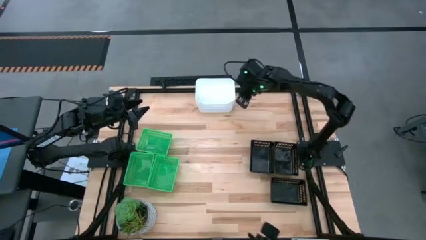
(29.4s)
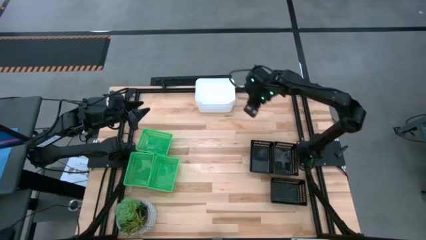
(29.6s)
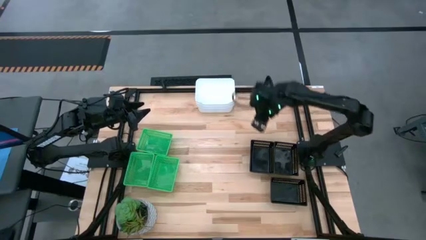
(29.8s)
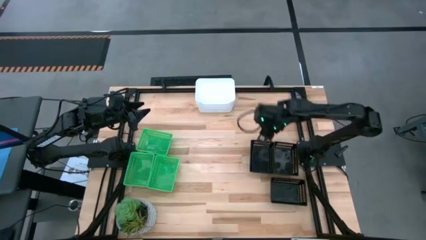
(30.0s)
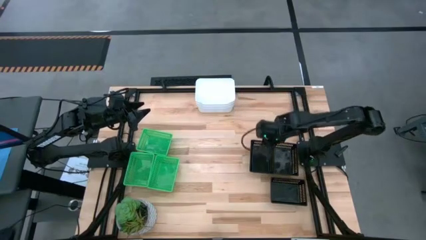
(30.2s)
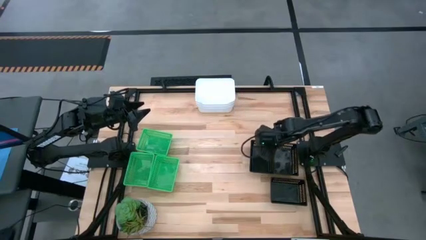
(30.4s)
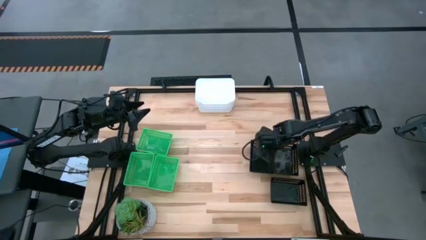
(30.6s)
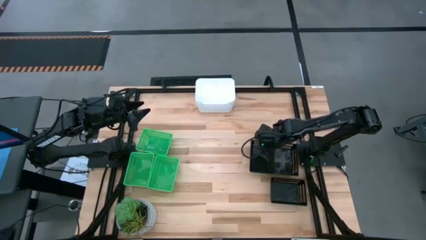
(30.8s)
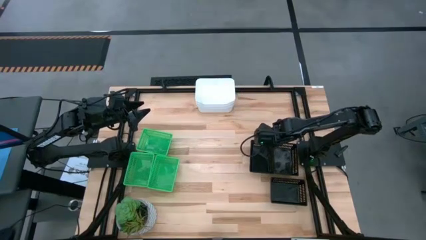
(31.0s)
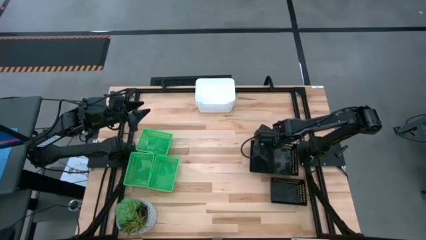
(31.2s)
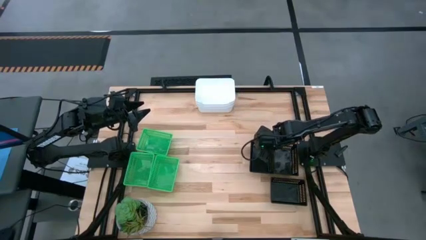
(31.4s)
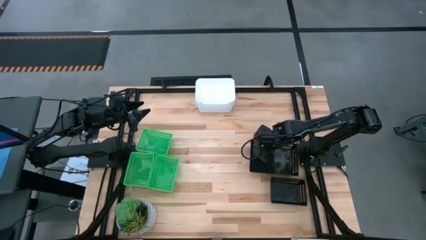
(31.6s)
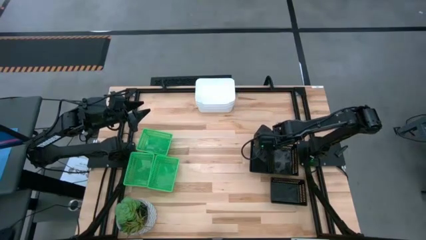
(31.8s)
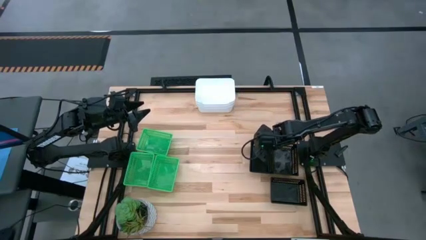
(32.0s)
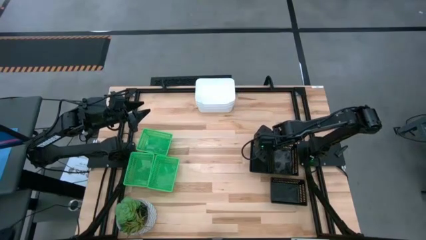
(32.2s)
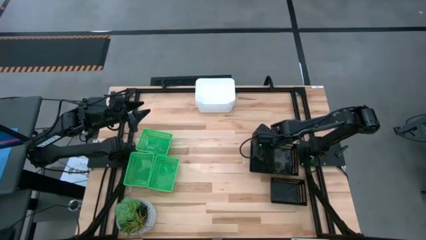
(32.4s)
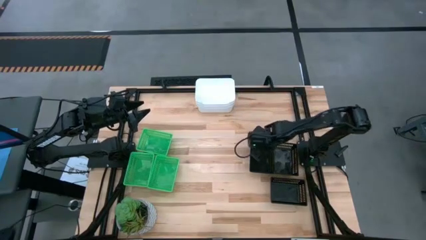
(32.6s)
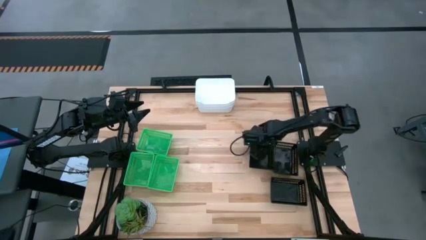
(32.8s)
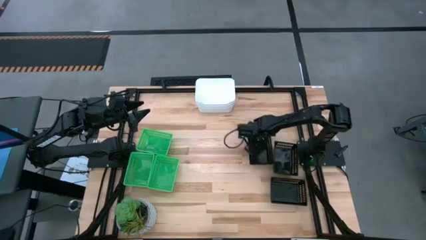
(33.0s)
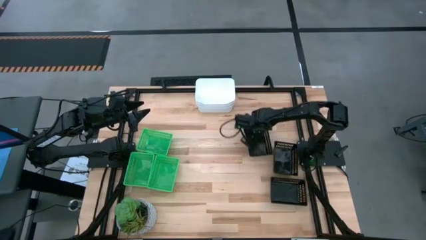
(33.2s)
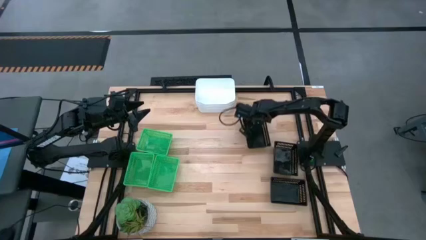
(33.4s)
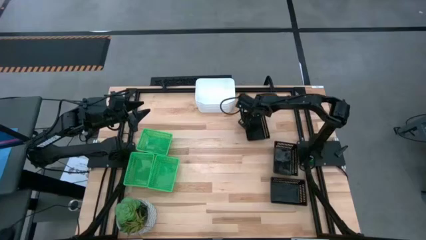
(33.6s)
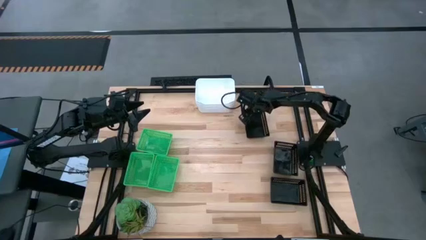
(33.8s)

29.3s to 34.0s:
Move the top left black bin to the top right of the table

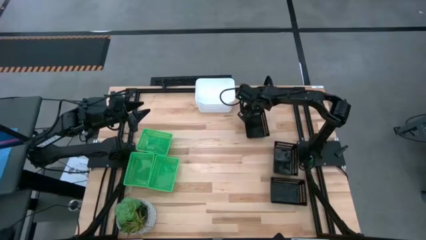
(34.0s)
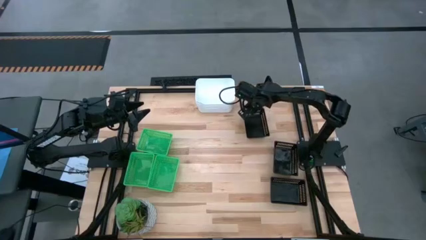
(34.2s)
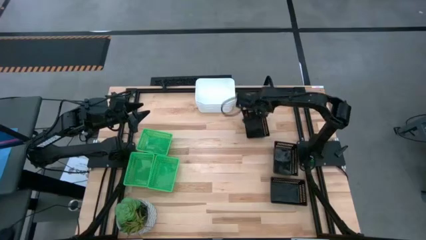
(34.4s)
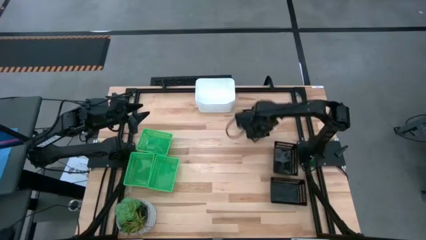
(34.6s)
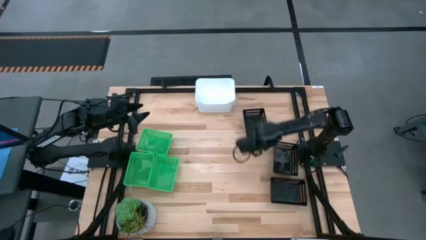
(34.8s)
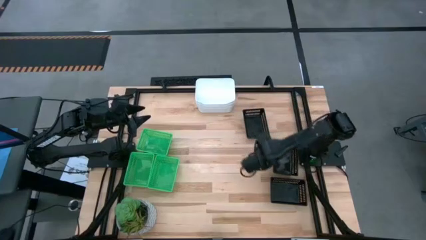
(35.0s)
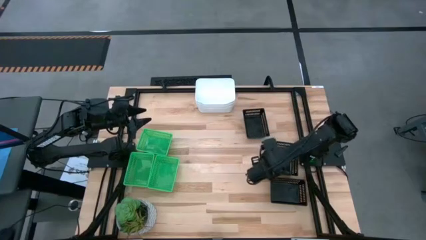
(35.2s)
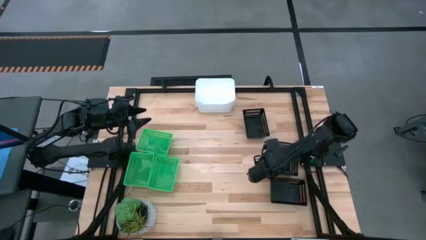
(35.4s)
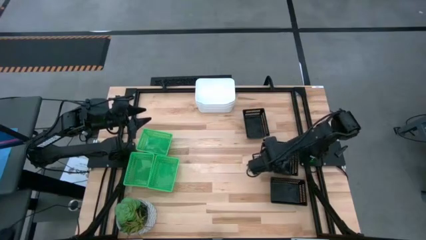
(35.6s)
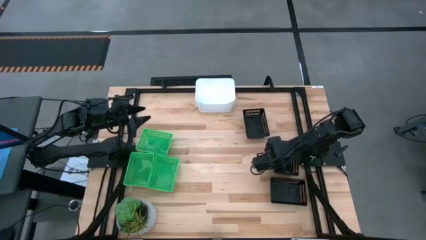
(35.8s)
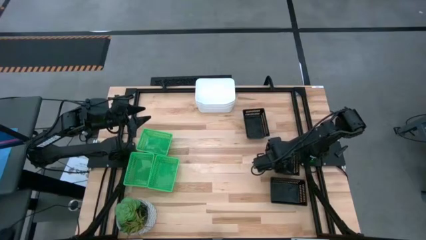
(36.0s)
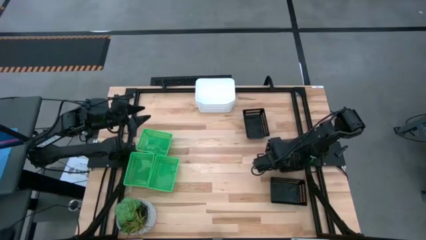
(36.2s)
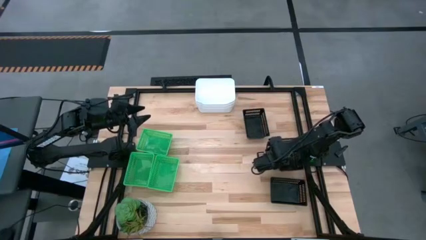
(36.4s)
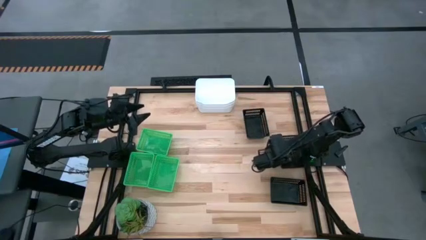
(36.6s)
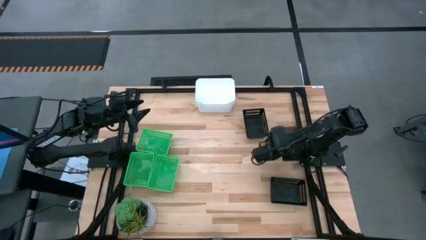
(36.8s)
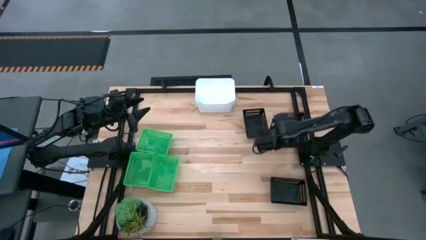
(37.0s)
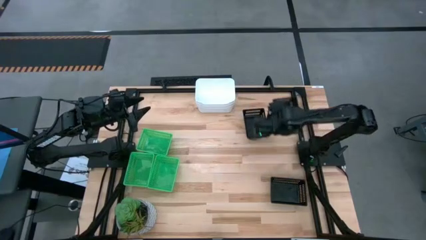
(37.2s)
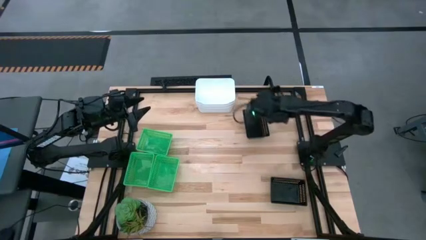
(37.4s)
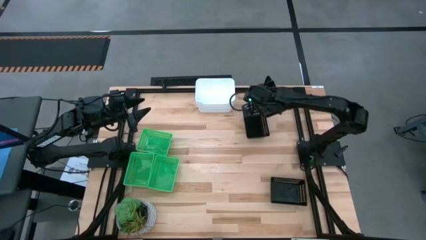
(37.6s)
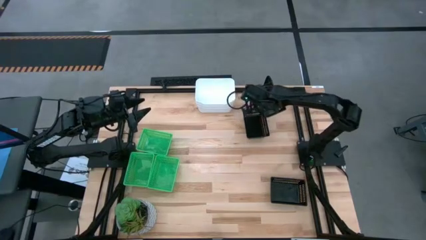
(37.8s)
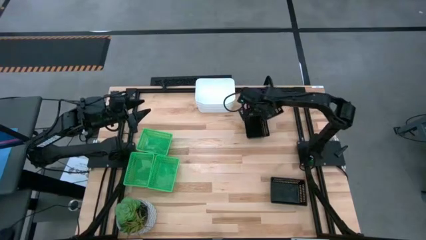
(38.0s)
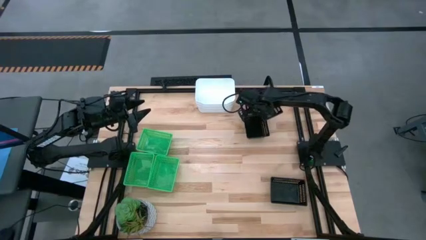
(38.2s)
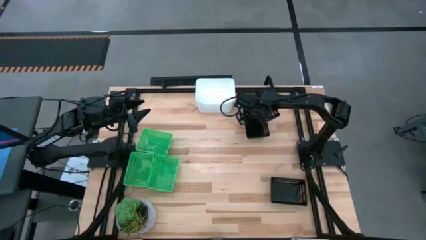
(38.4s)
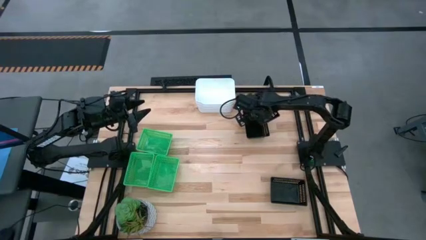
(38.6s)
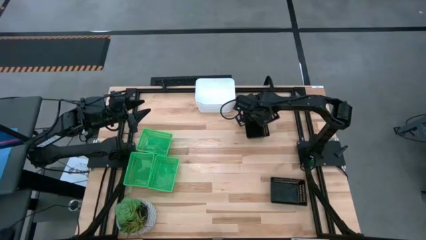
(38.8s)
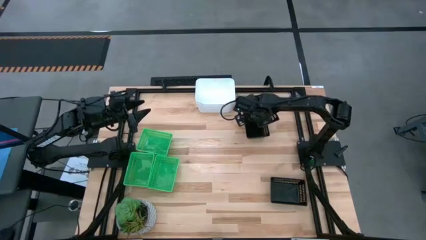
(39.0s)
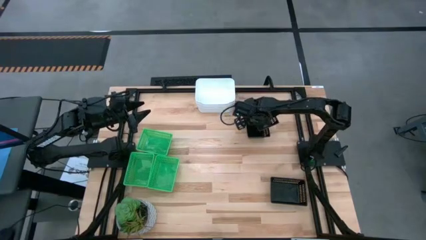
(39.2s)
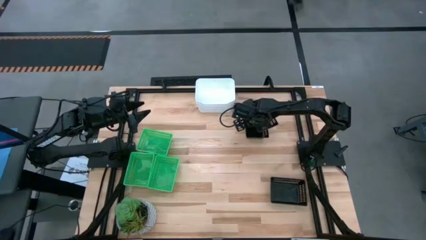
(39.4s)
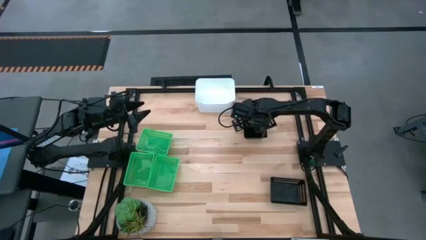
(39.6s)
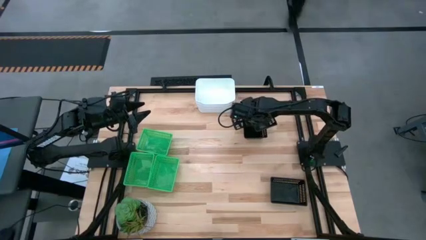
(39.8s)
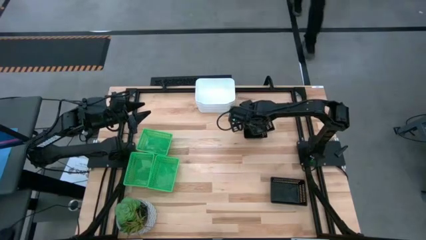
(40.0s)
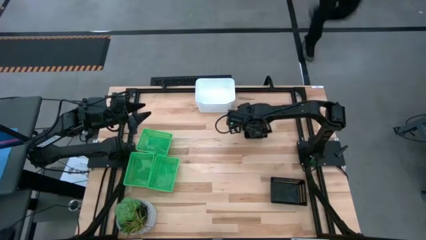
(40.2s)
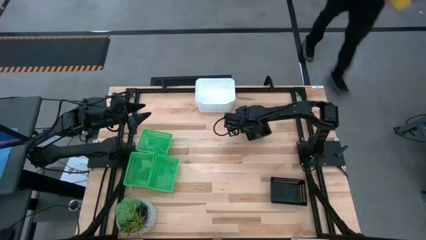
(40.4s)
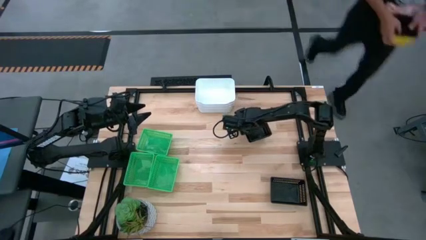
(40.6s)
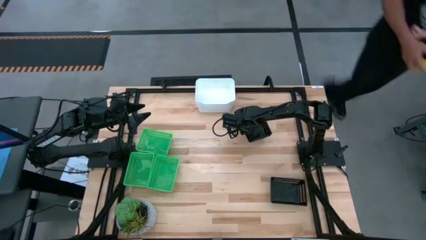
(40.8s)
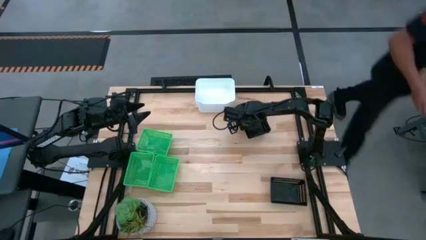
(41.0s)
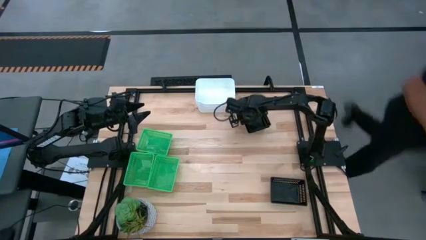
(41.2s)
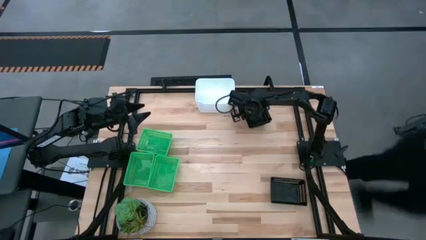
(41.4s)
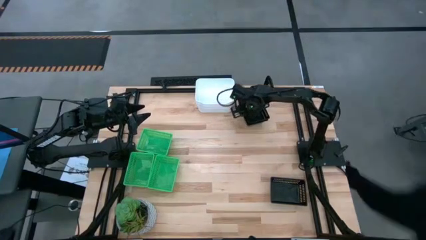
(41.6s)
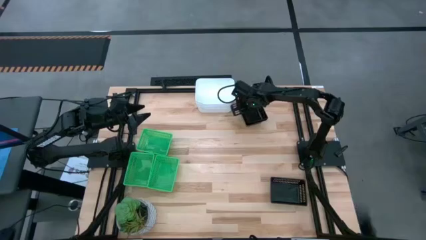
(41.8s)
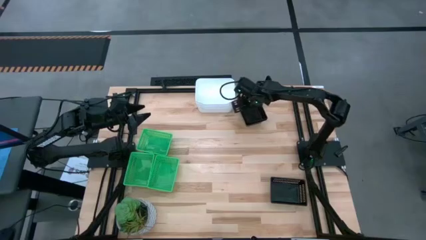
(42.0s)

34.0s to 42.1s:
Stack the middle black bin into the top black bin

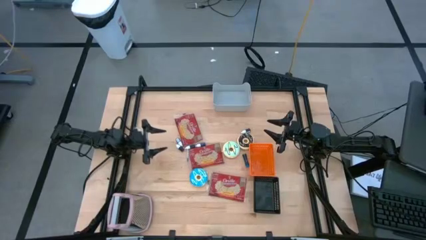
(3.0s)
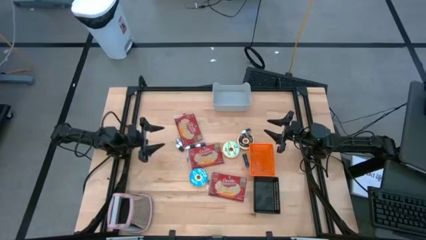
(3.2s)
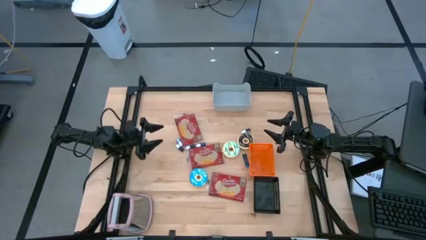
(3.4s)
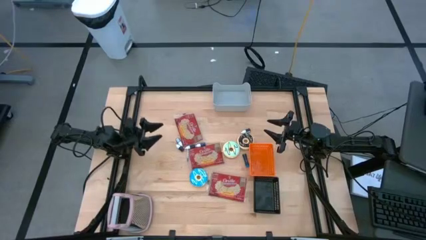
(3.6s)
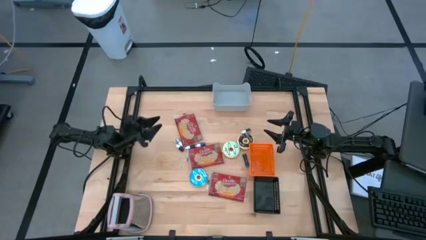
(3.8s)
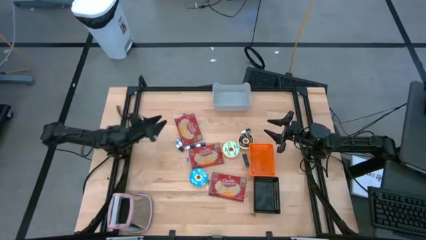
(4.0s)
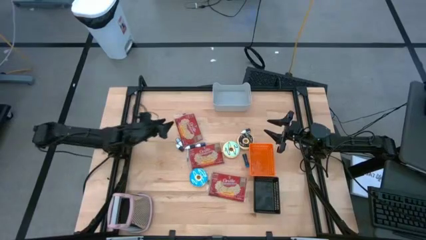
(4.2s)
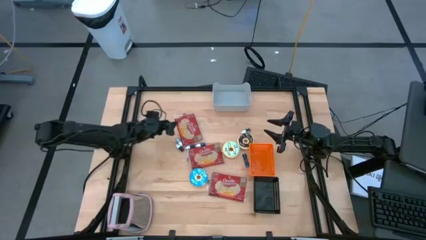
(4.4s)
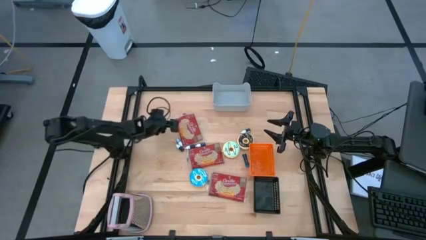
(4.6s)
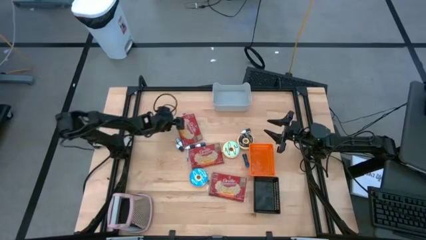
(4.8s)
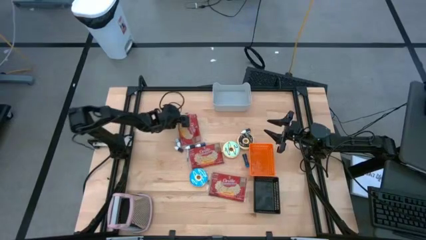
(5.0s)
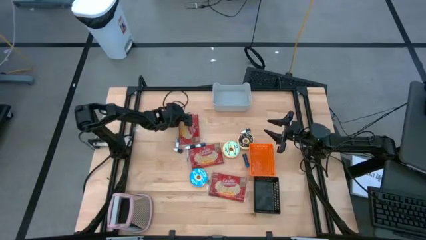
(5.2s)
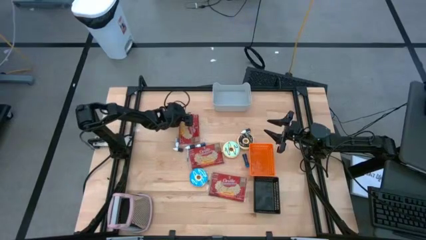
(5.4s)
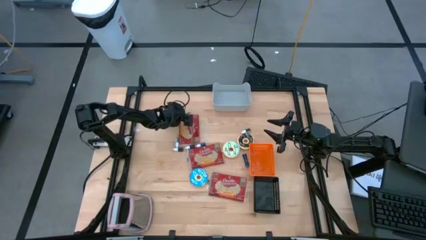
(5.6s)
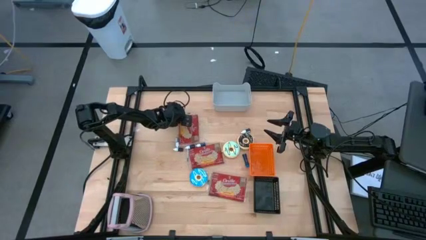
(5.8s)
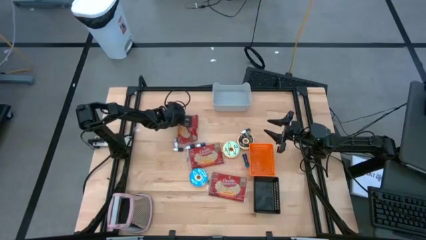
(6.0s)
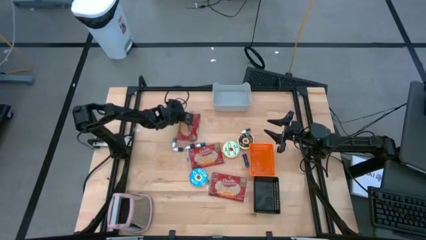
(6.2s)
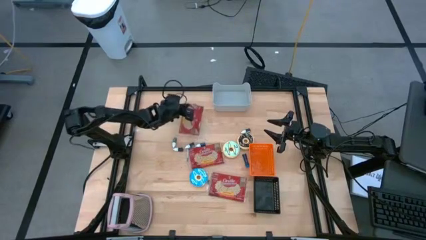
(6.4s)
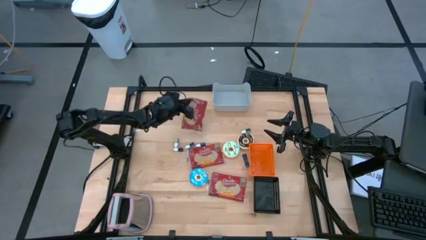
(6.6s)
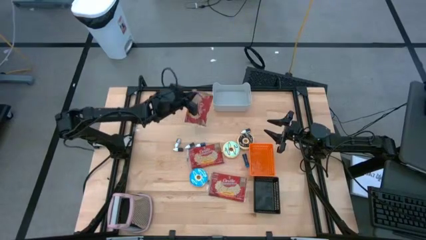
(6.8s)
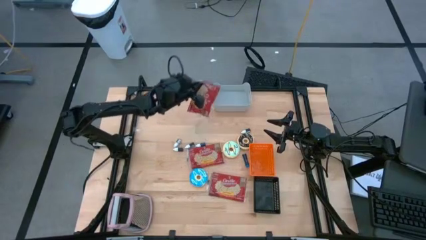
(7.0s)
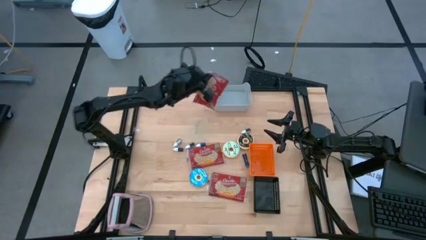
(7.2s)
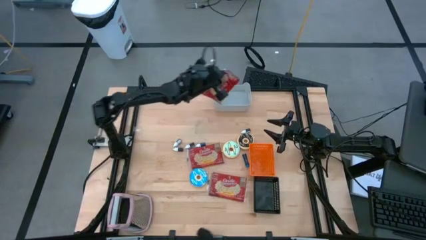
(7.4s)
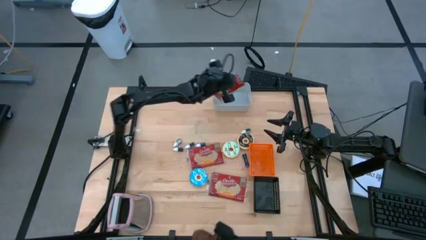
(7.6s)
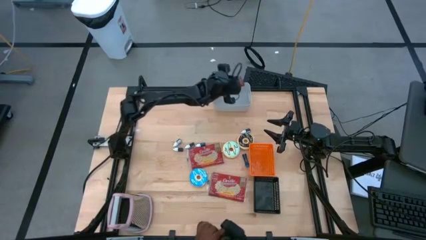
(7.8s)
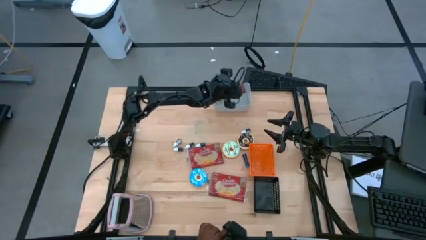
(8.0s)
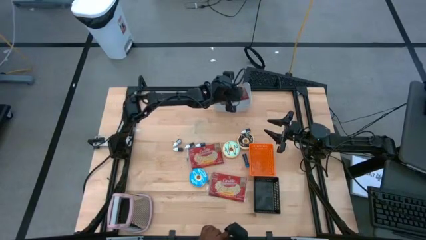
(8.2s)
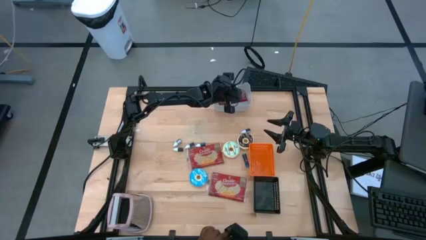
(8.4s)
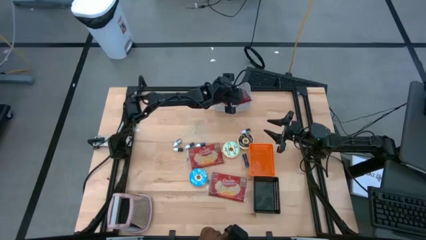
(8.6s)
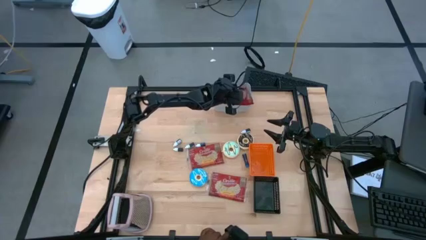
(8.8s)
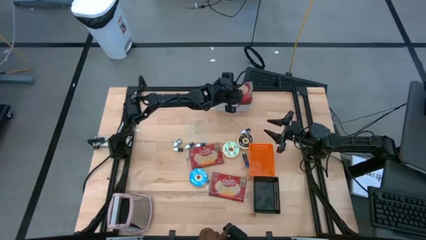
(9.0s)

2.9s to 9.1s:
Put the top popcorn bag into the gray bin
